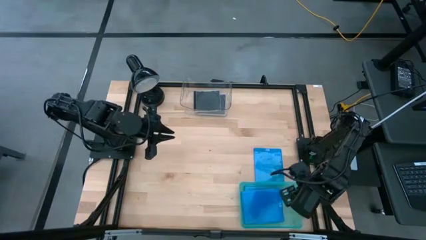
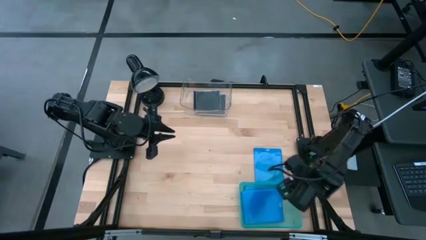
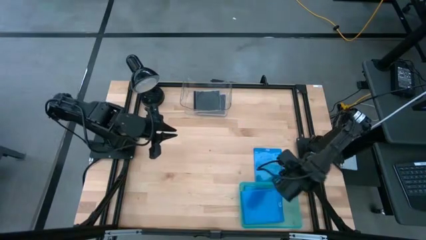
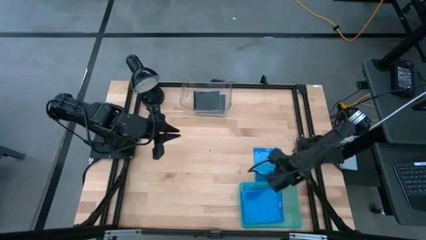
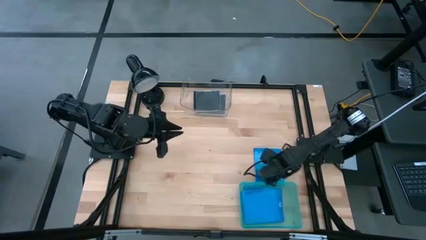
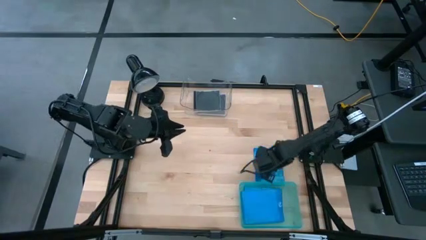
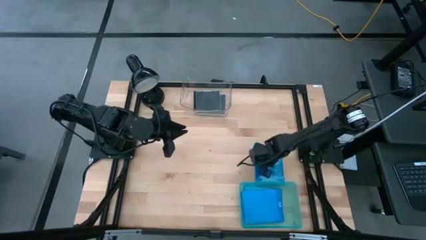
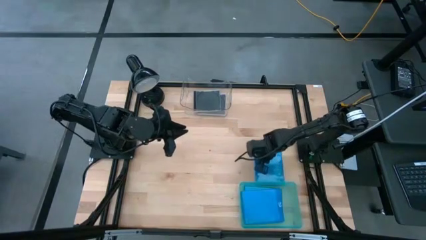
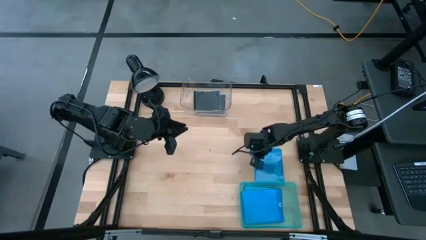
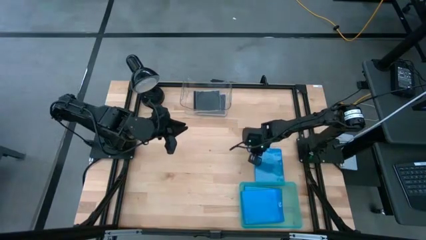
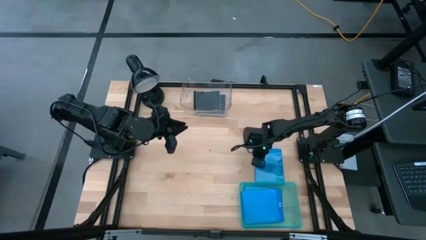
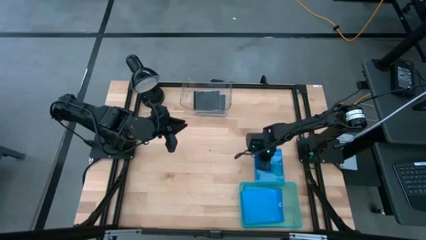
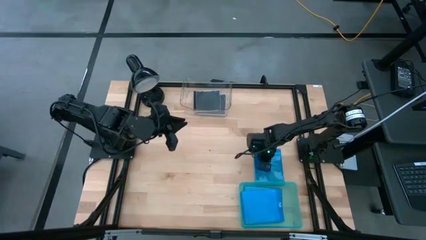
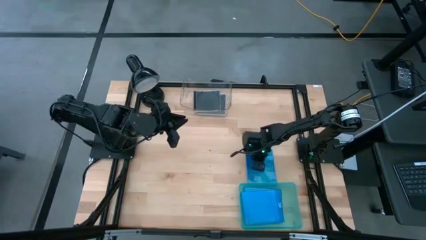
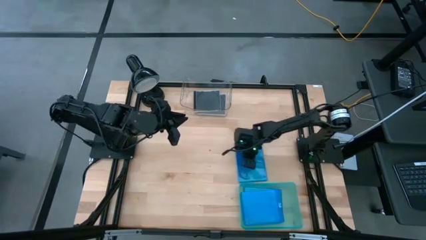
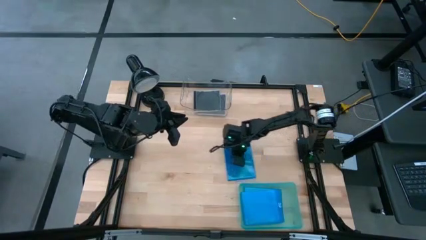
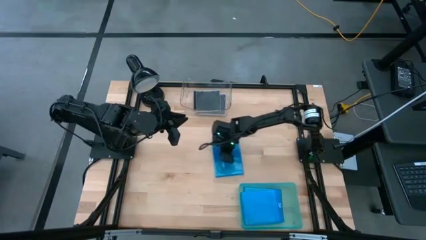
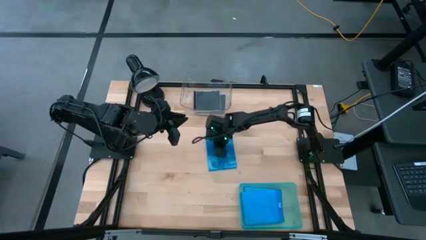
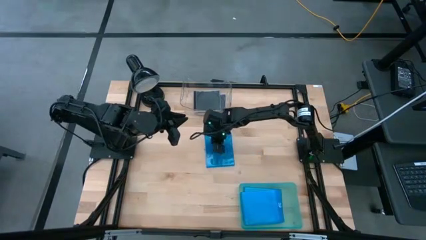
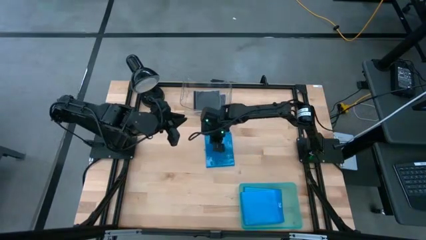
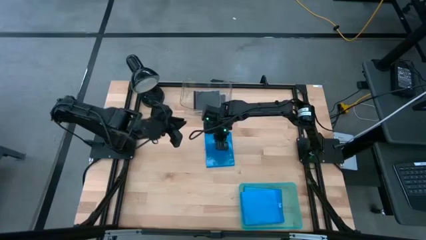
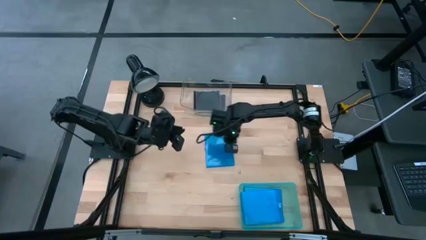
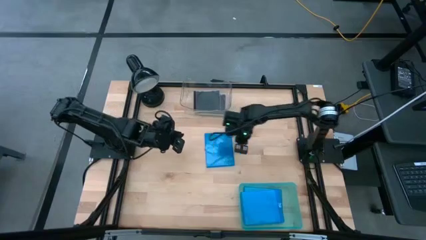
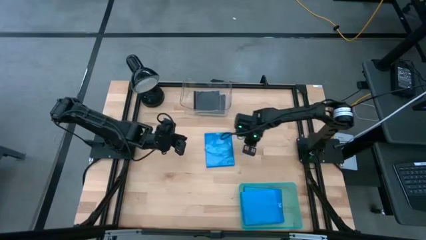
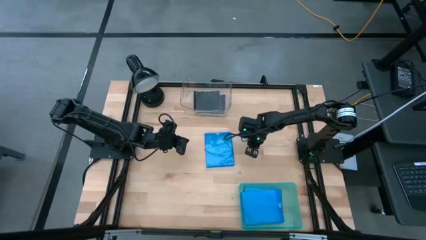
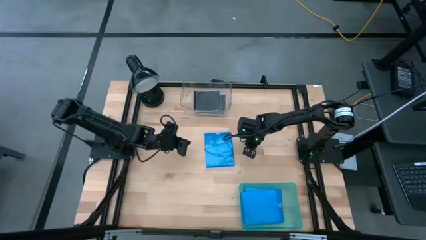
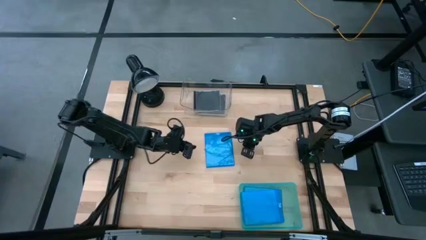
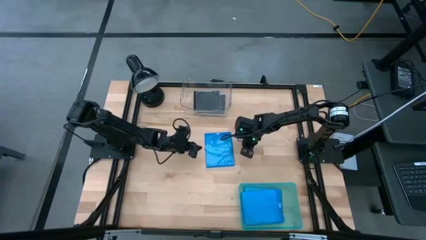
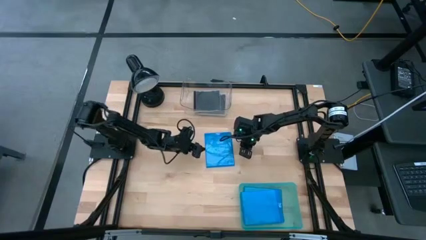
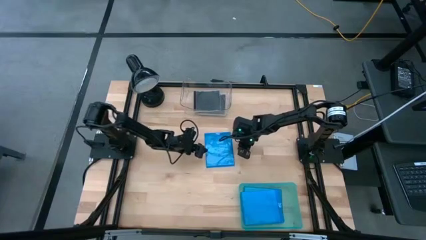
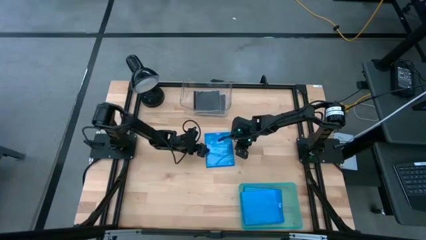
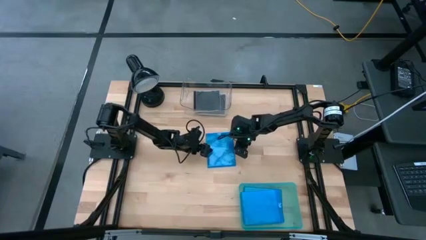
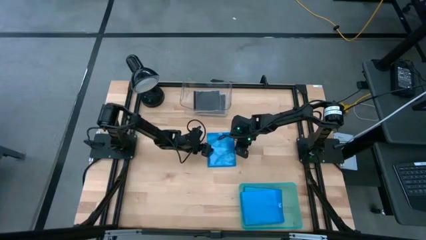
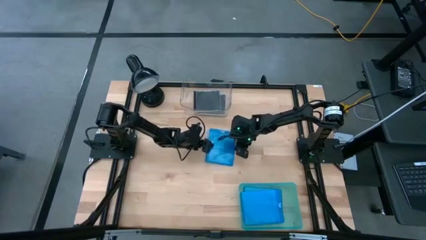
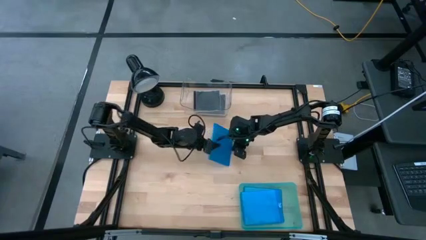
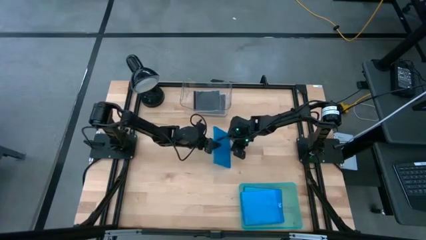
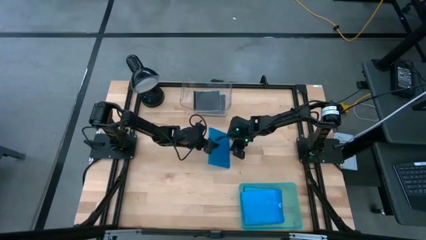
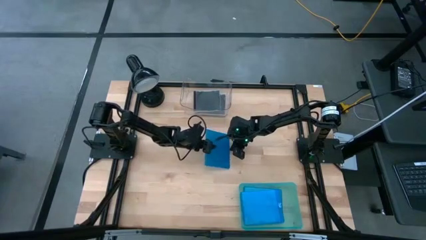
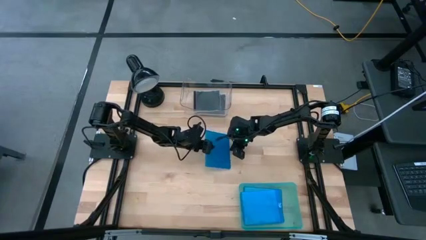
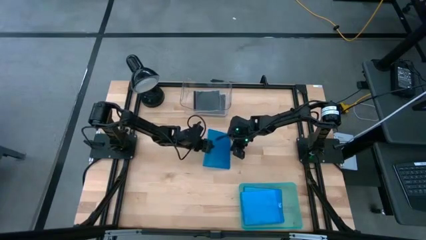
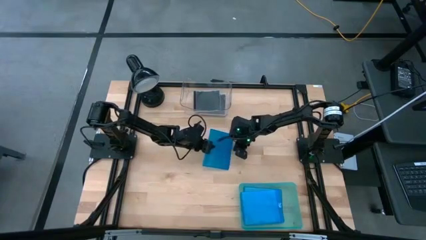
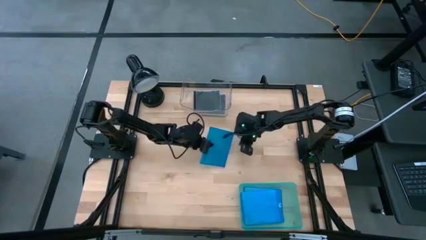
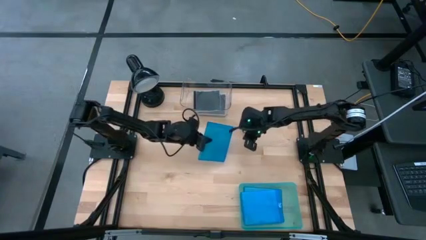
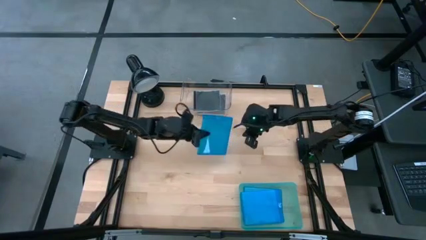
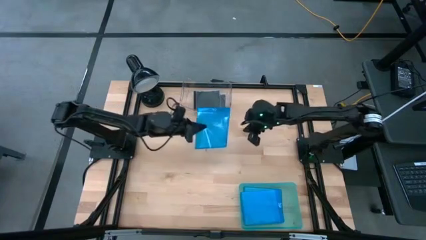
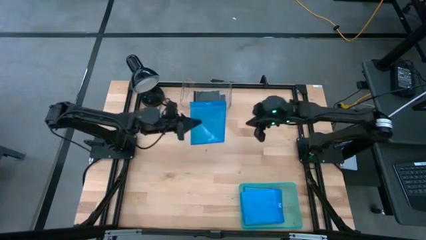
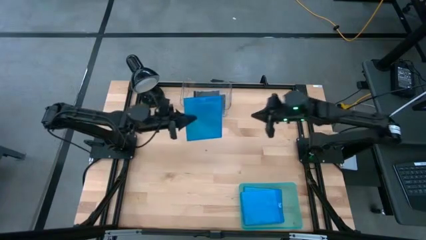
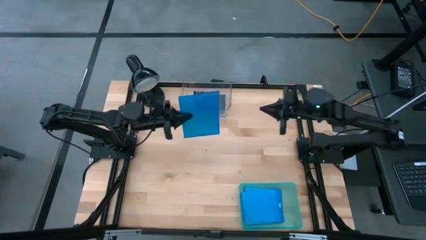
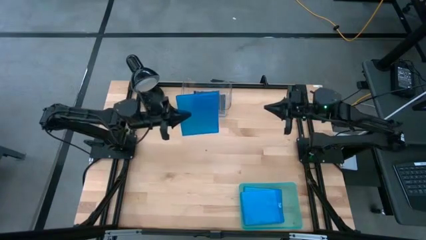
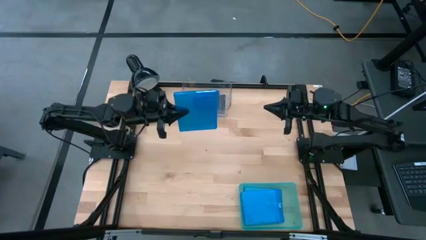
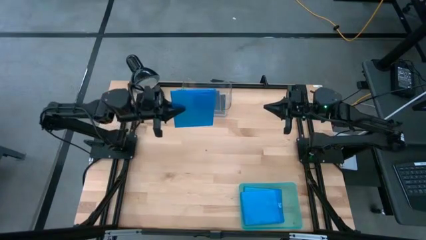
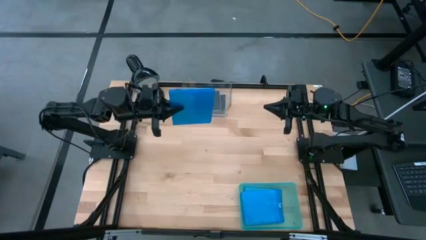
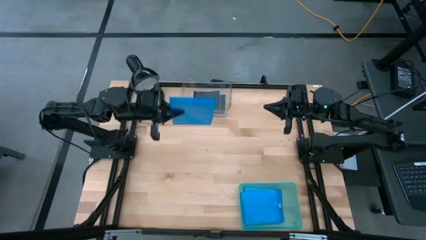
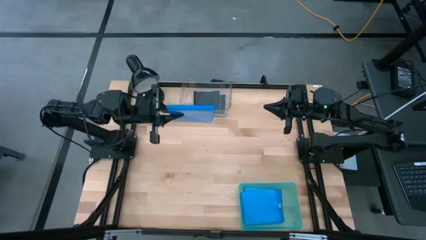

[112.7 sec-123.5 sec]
Task: Pick & place jewel cases by type
Put the blue cd case into the green bin

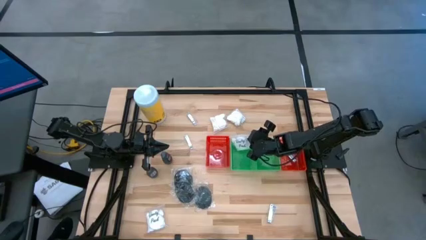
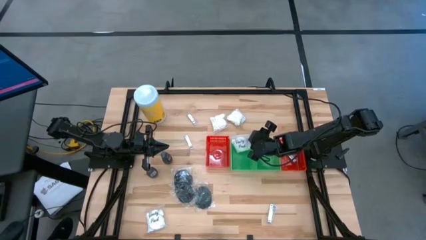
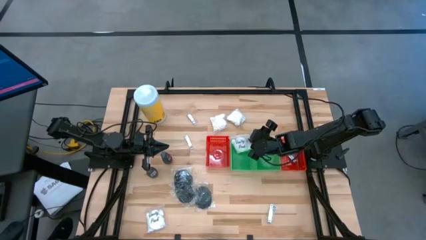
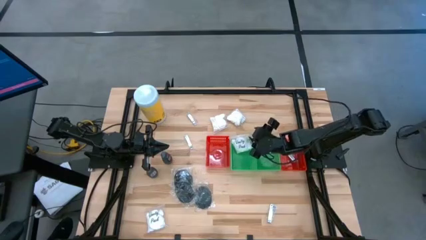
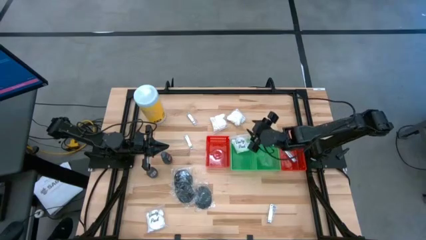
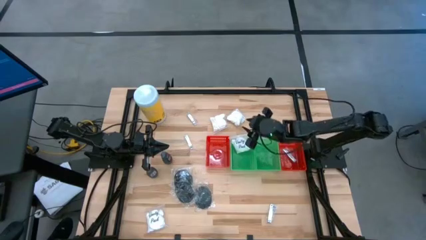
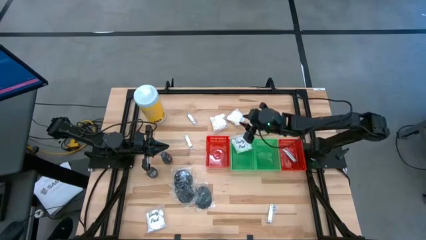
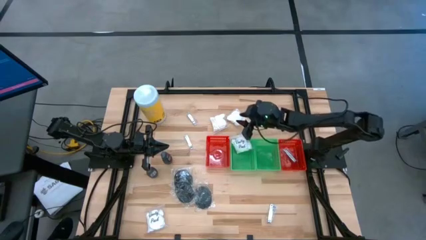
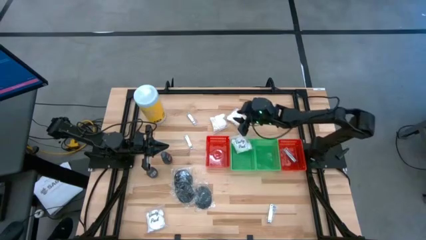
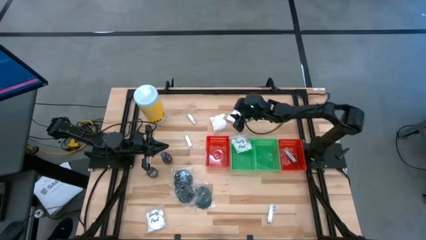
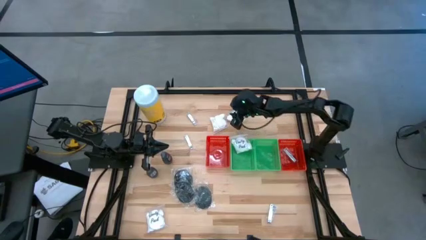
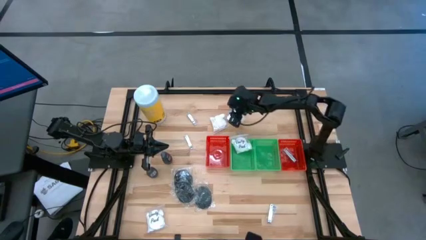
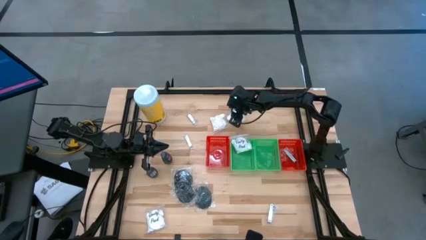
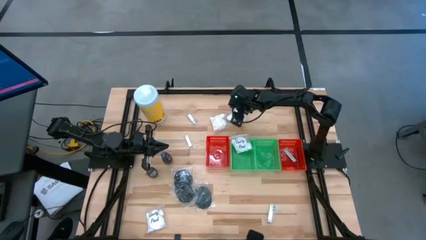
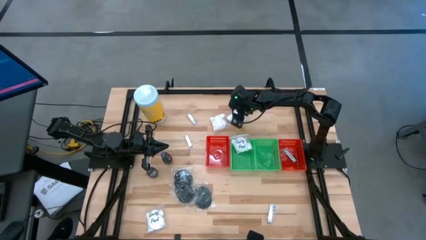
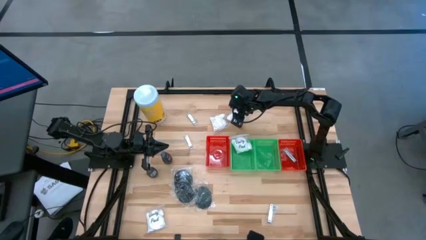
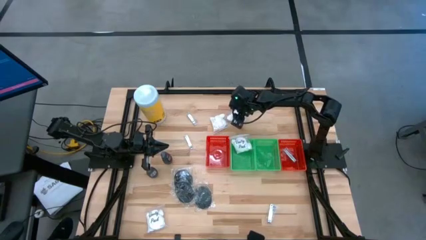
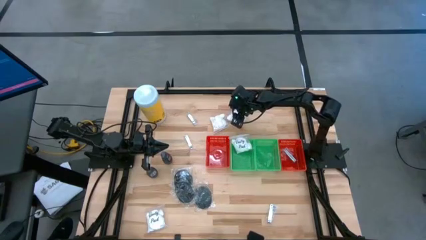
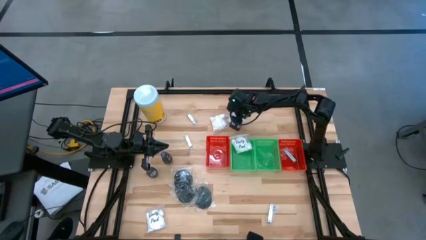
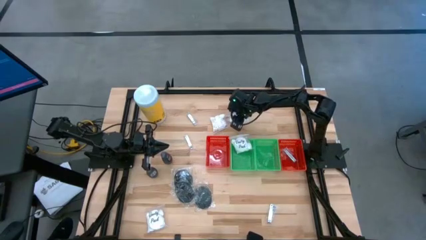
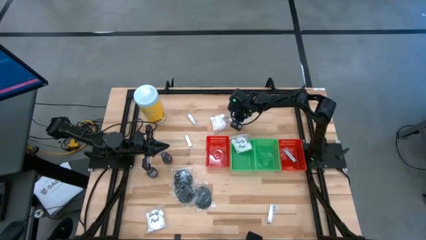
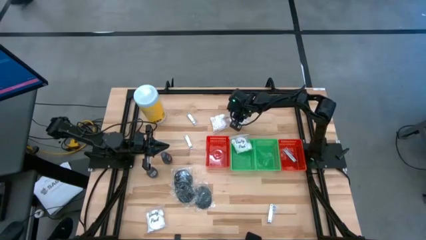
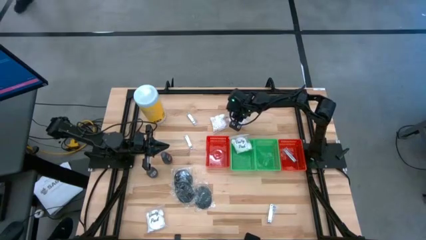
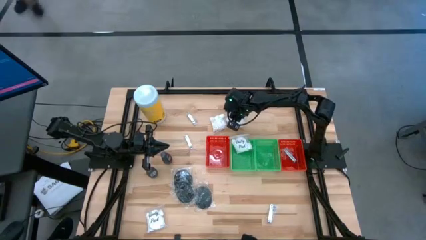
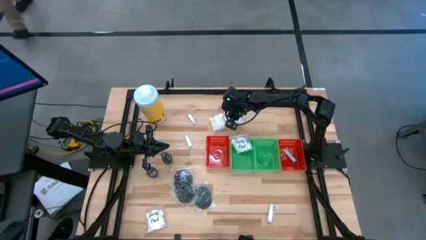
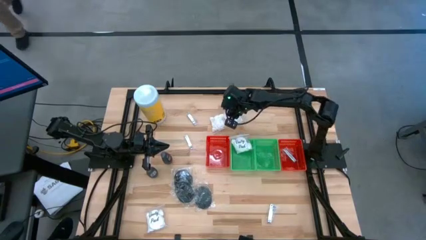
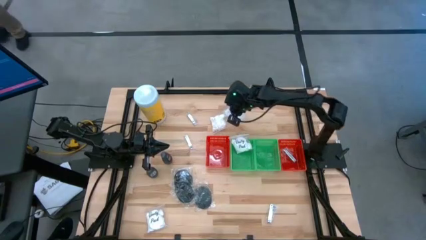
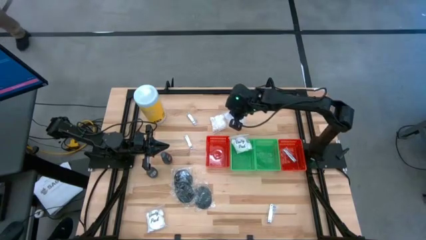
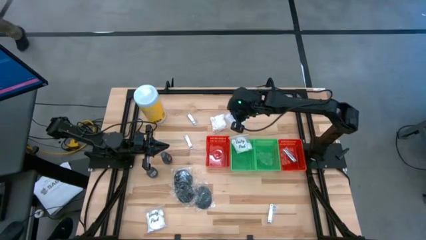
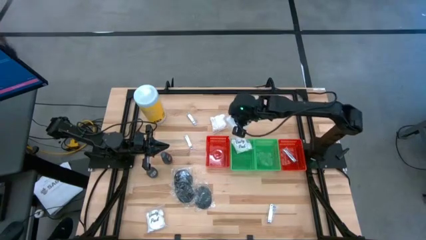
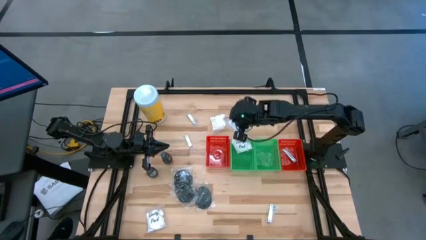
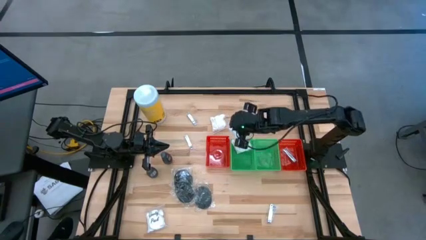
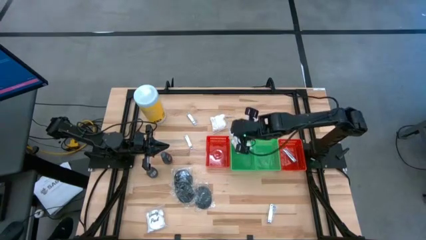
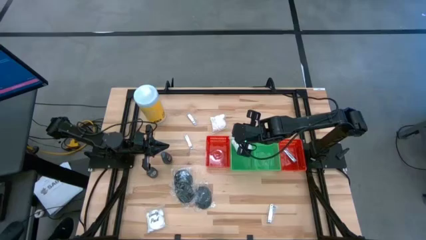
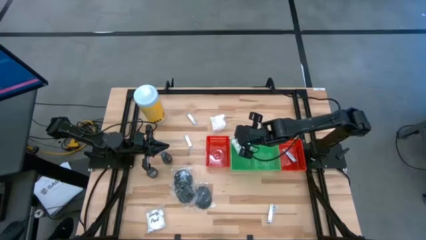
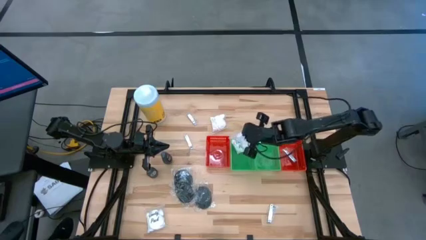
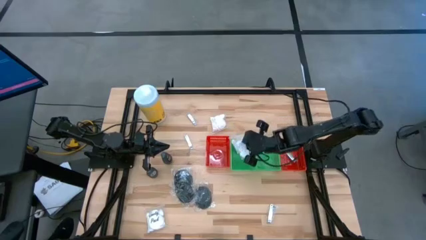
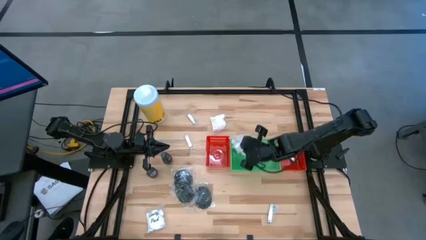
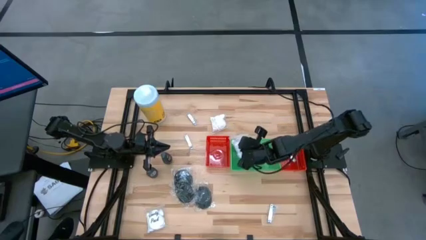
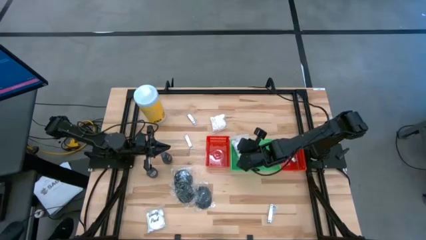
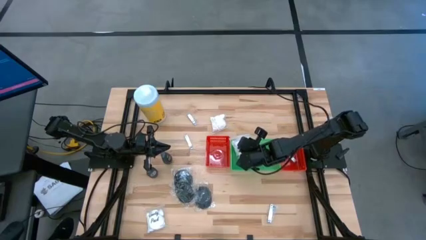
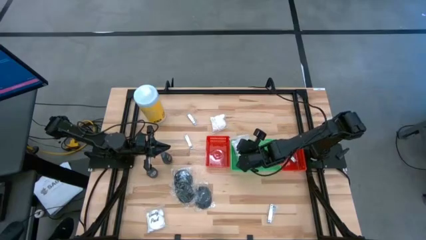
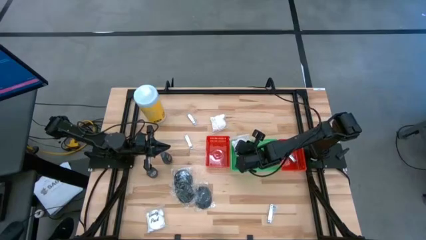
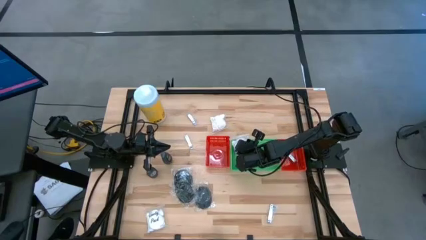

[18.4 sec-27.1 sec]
Task: Pick & Place Travel size toiletries
Put the cotton pack into the left green bin
